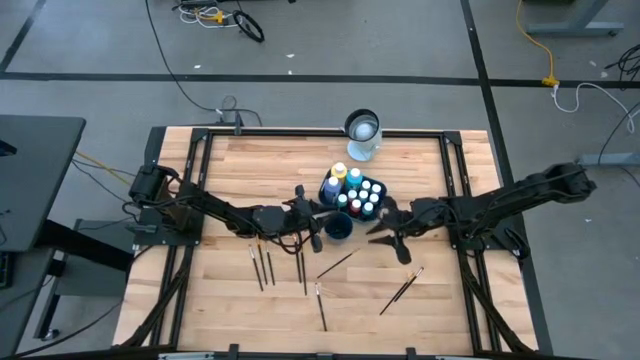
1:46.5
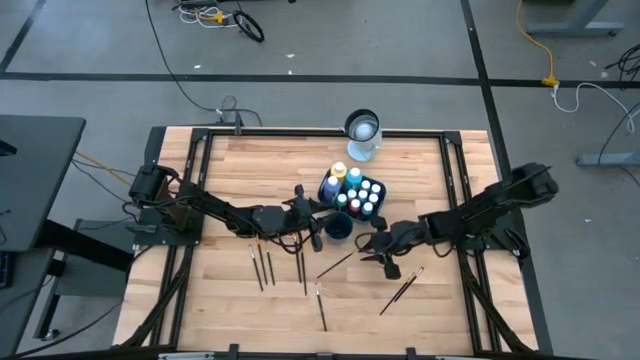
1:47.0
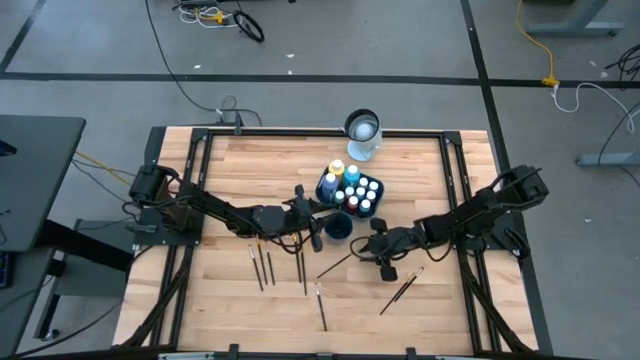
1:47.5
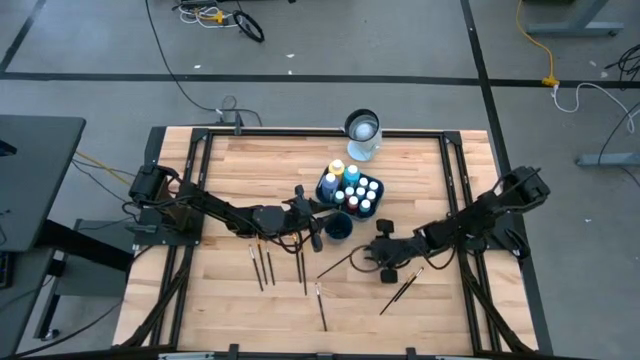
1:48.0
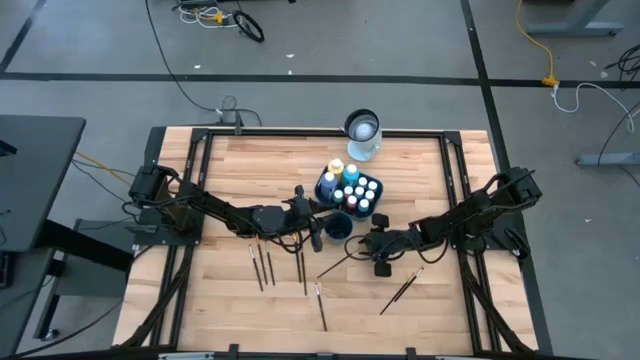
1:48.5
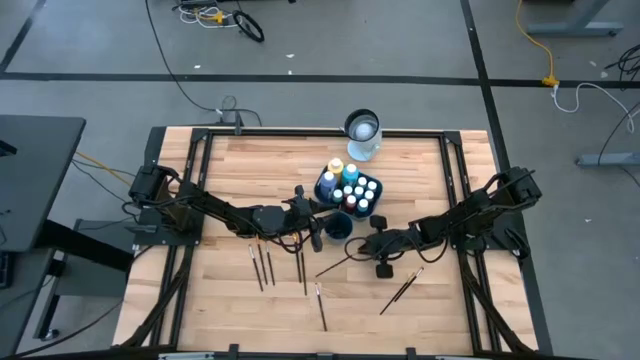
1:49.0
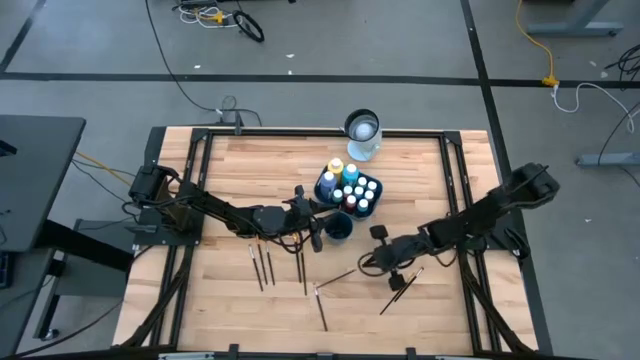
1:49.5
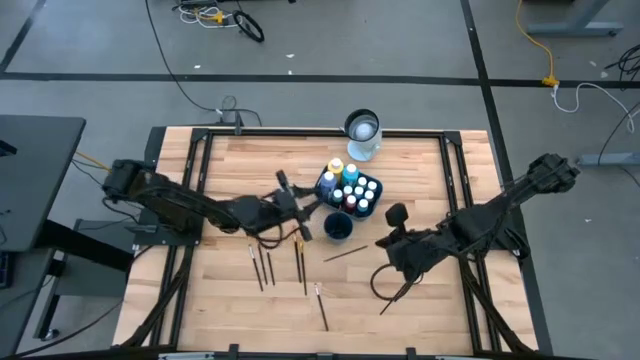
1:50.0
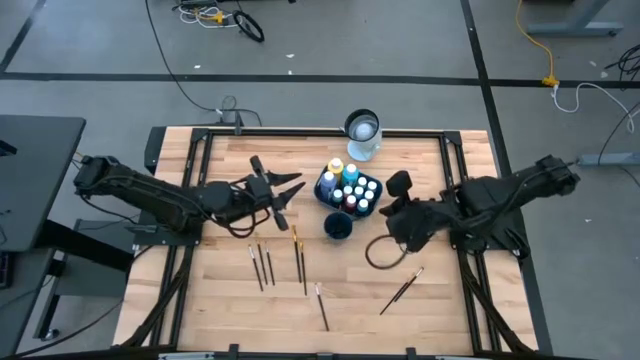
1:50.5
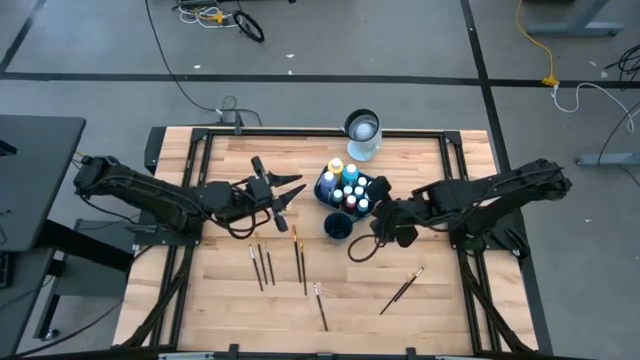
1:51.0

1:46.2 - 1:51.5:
Task: Pick & Place Paint Supplies
Put the gold paint brush into the blue cup

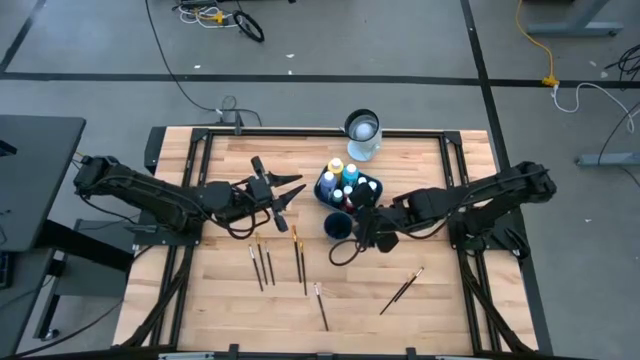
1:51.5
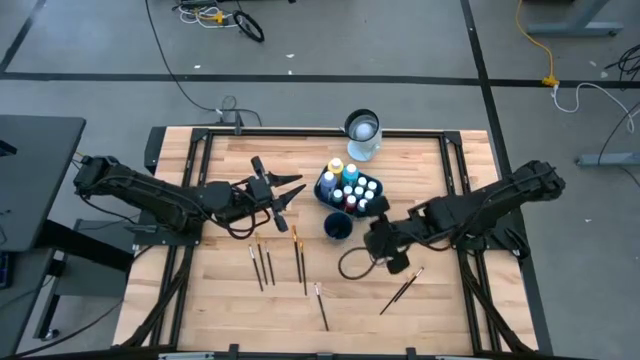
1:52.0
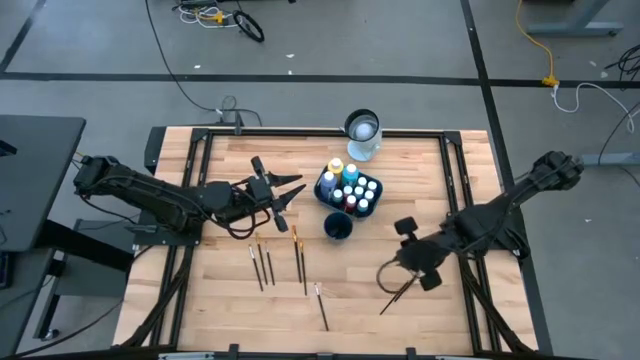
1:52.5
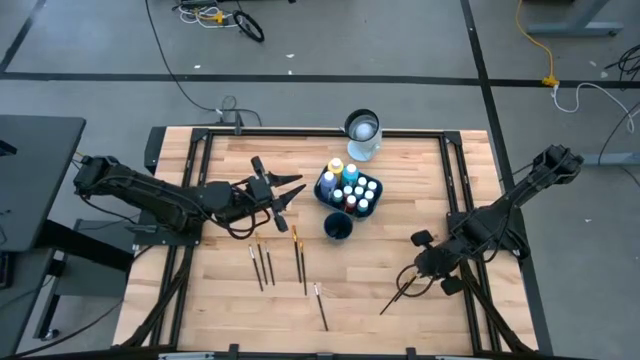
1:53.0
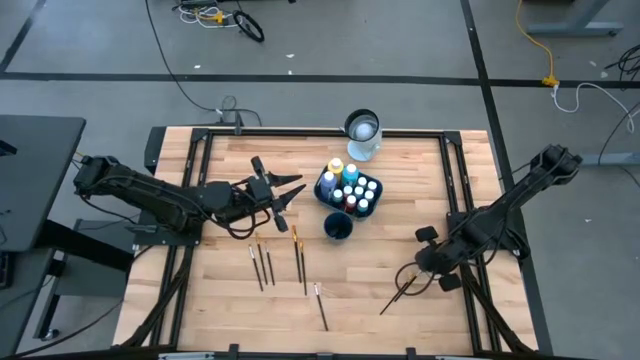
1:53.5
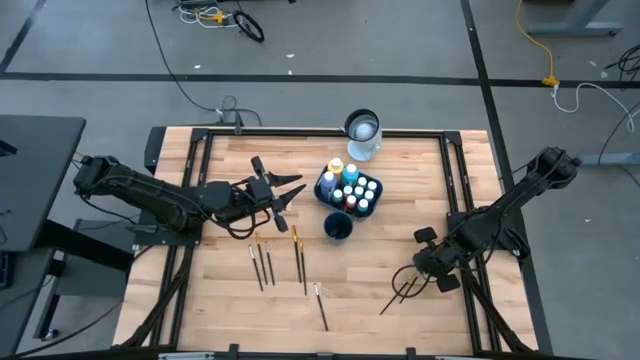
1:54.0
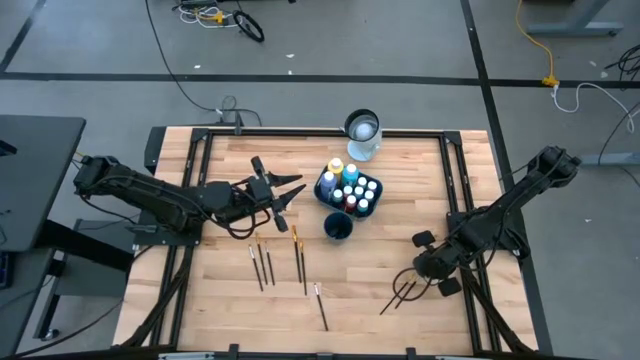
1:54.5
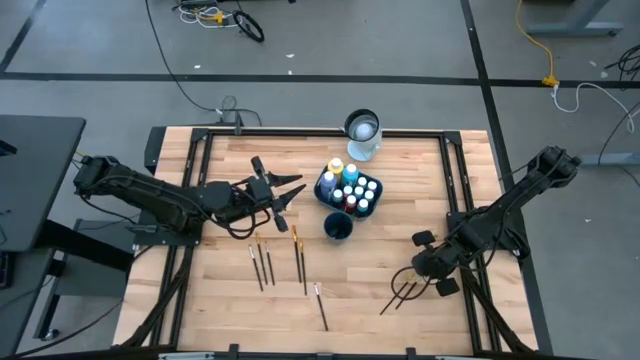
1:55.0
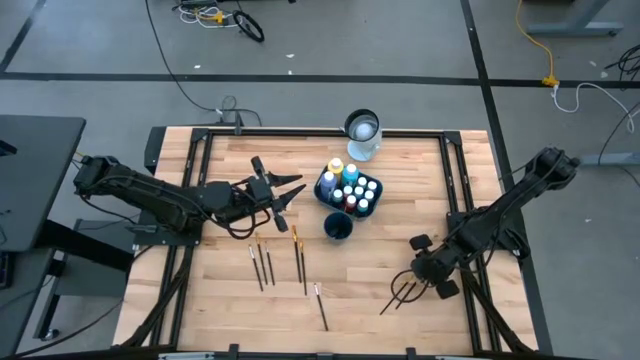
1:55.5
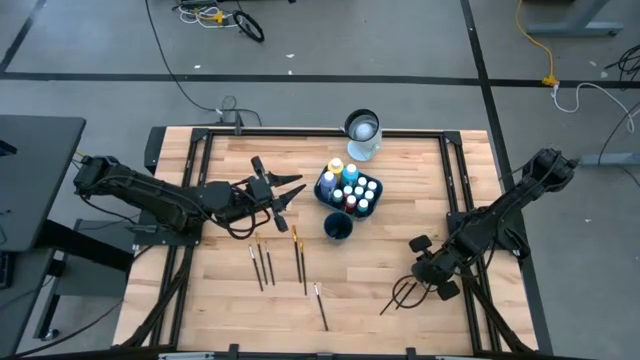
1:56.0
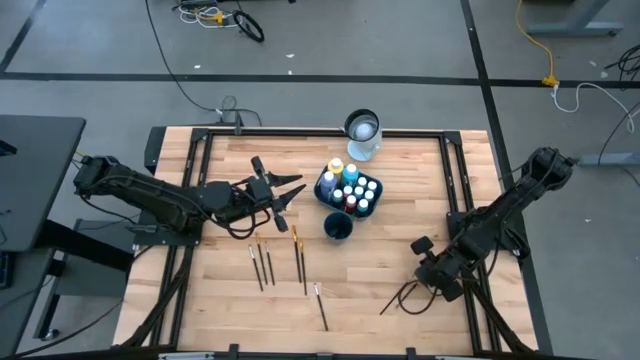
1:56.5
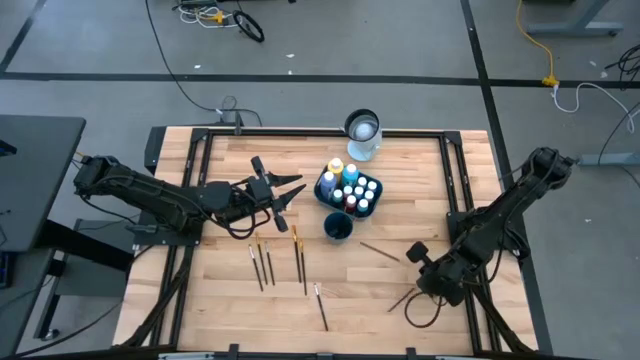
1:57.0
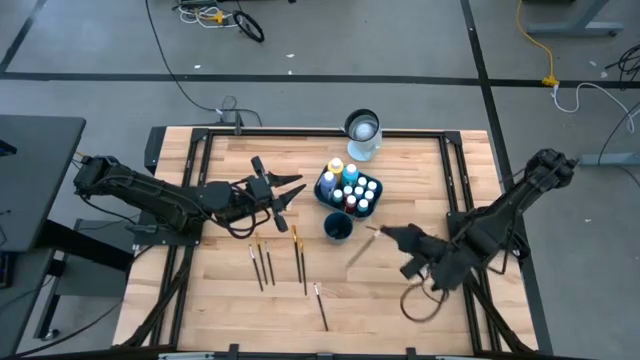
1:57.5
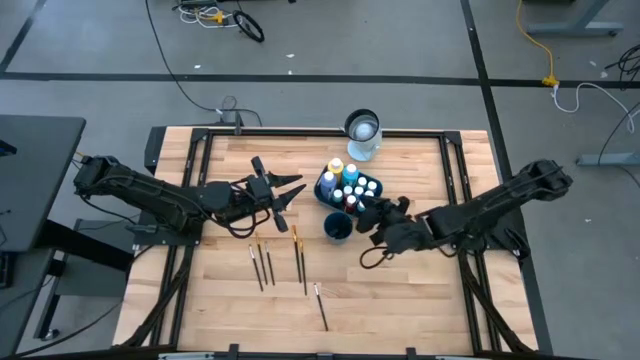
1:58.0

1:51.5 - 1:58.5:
Put the silver paint brush into the blue cup

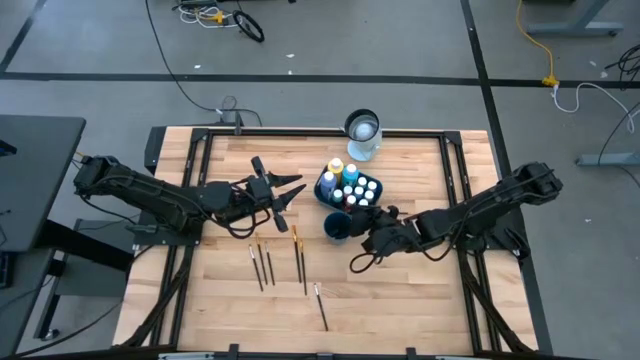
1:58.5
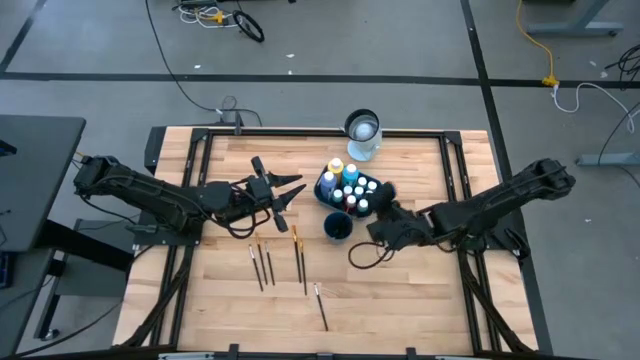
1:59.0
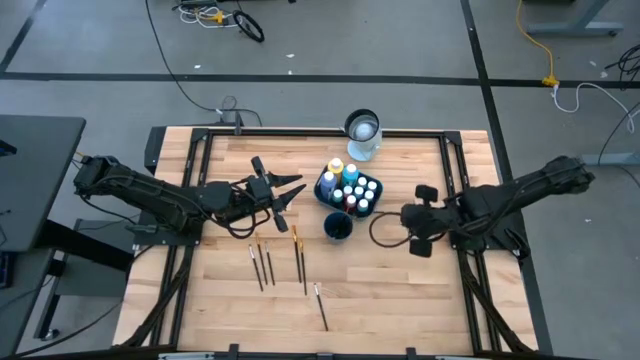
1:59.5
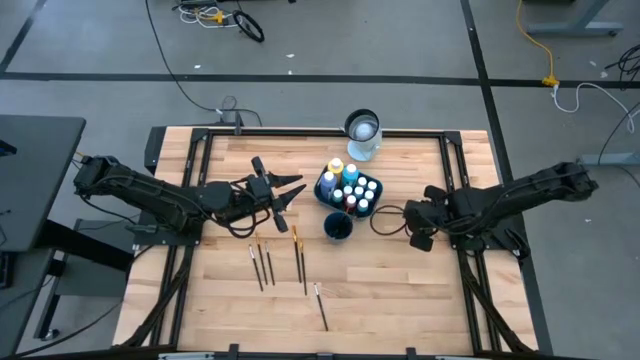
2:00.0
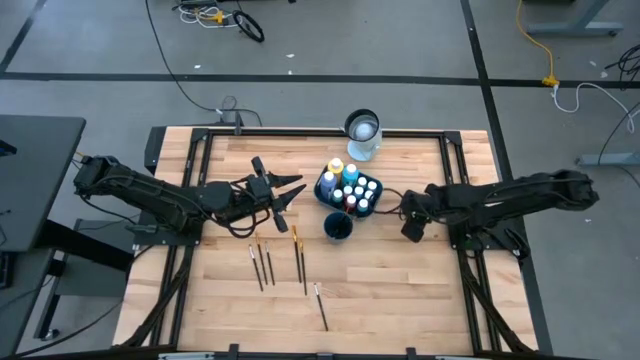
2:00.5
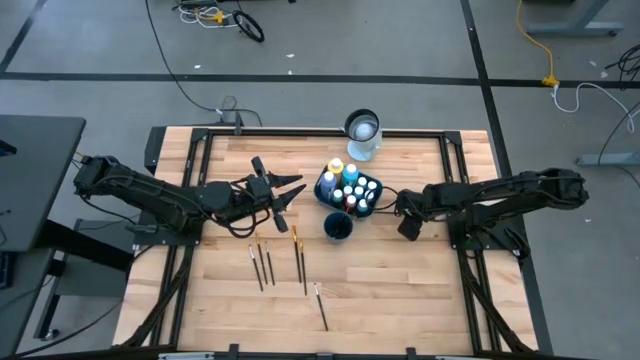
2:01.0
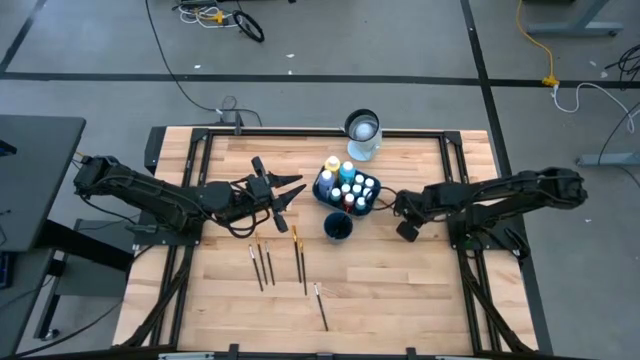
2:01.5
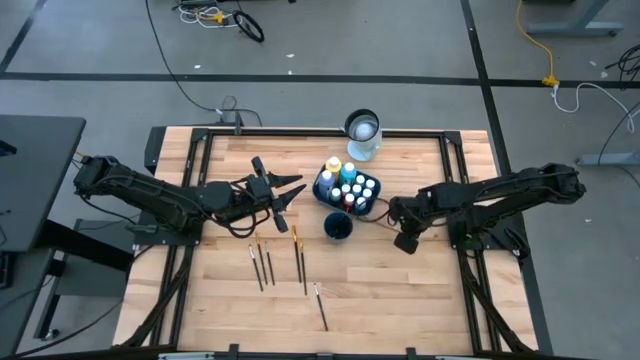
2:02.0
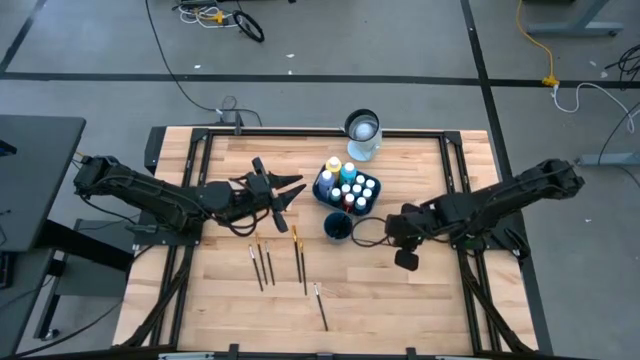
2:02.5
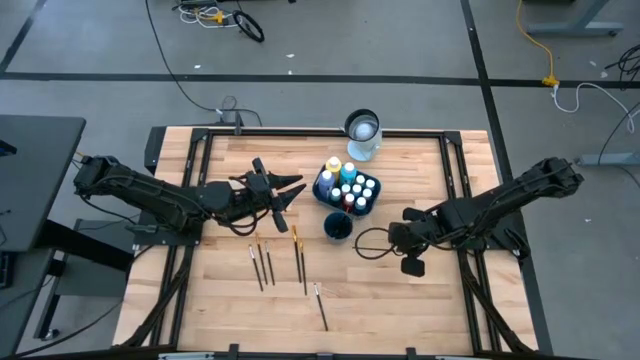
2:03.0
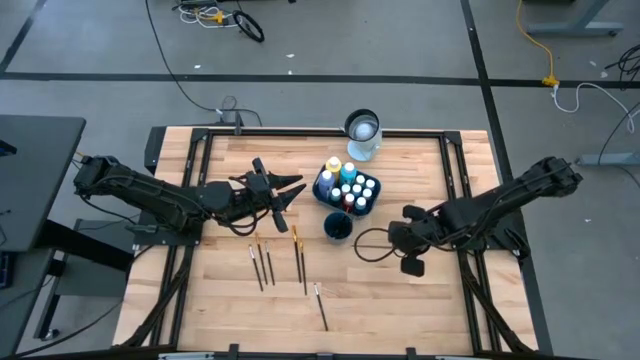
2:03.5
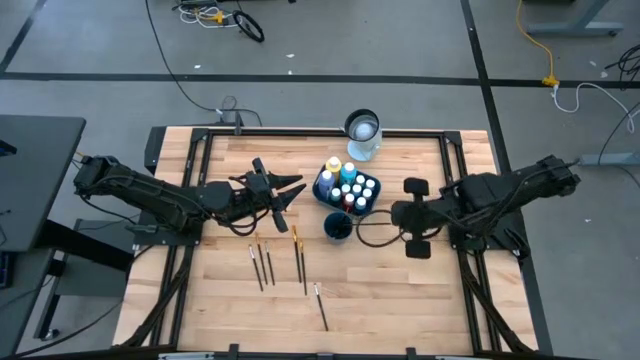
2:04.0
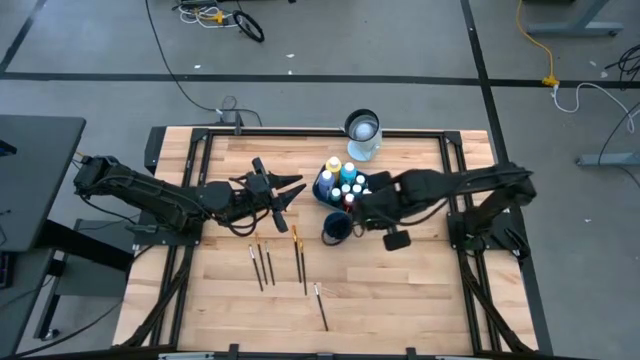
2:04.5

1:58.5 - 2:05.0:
Put the gold paint brush into the blue cup

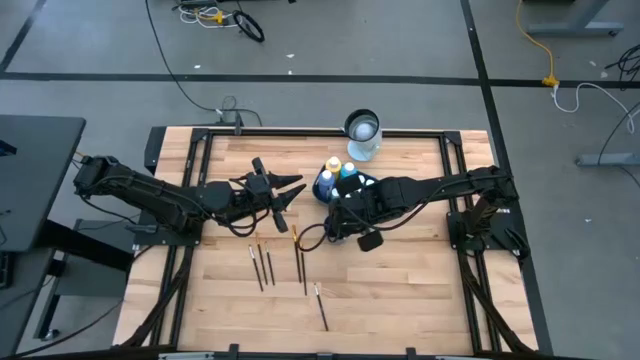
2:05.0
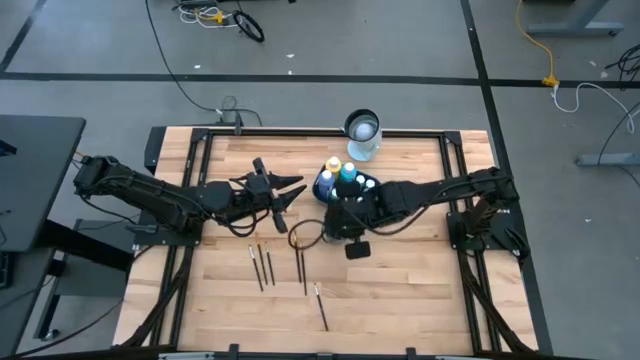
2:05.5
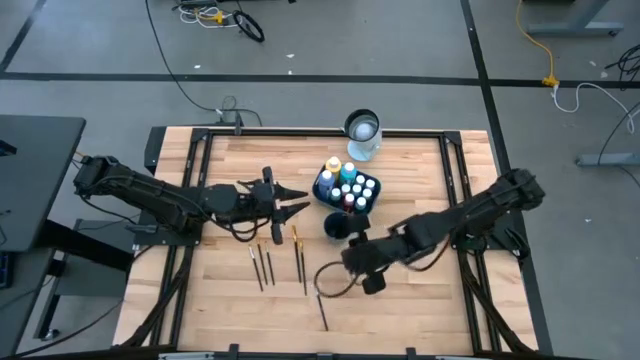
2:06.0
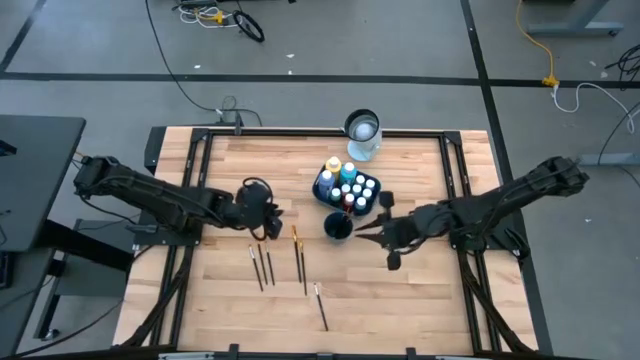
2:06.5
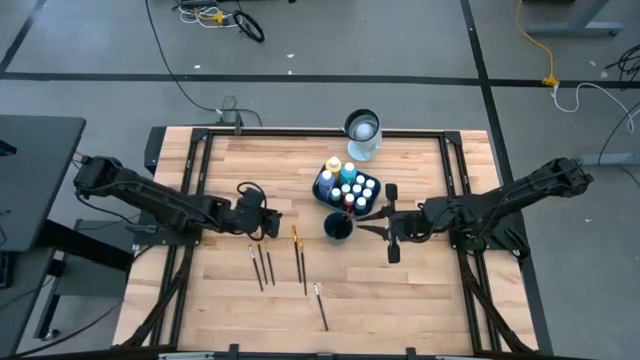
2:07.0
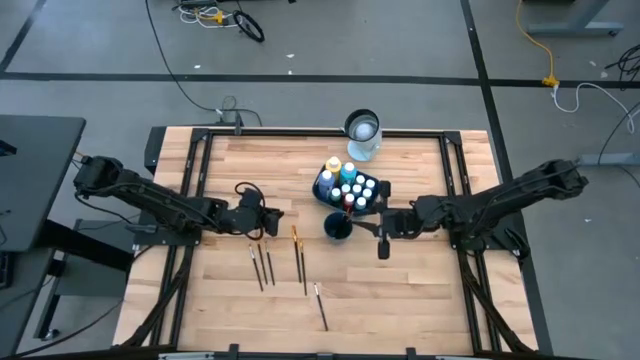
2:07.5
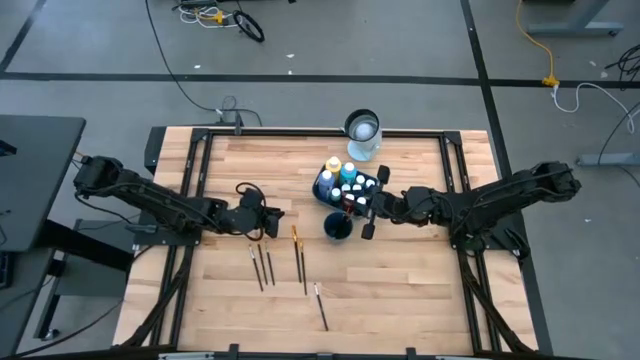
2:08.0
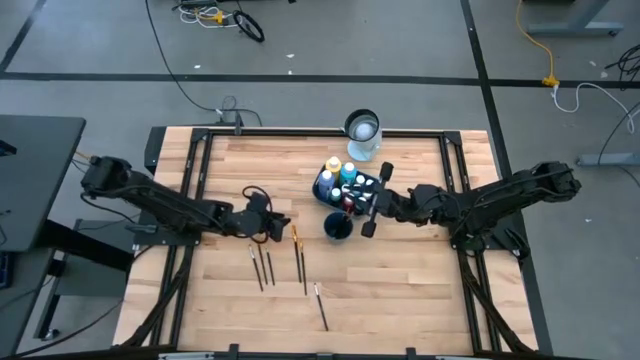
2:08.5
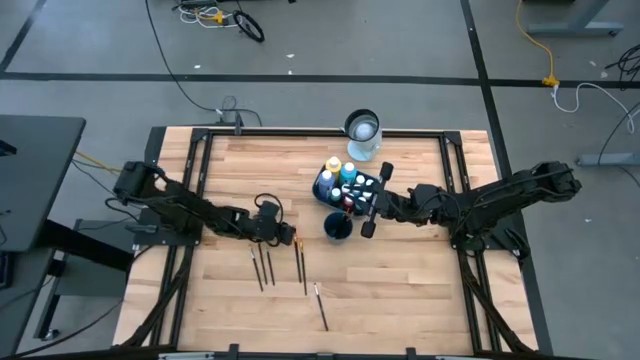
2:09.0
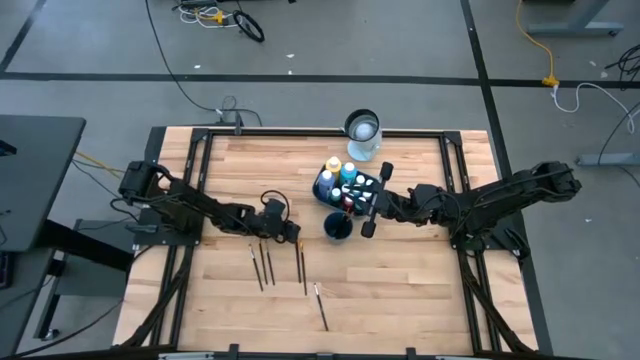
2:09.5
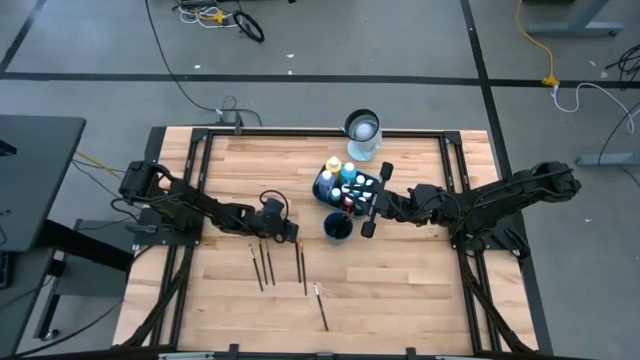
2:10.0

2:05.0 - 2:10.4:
Put the gold paint brush into the blue cup
